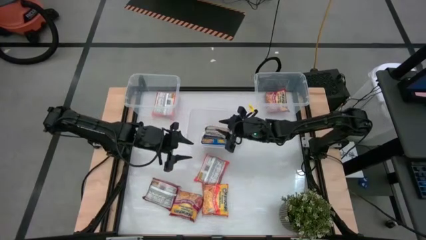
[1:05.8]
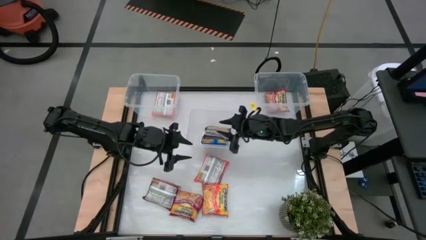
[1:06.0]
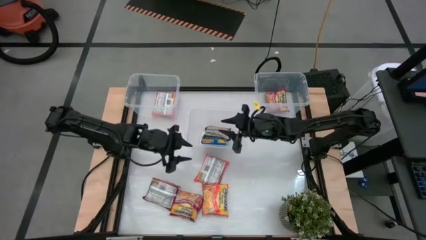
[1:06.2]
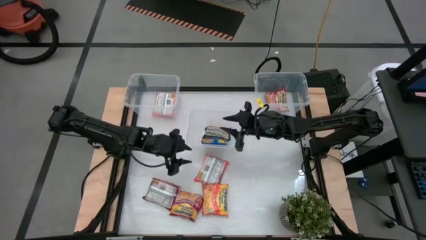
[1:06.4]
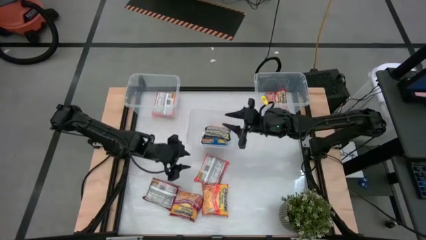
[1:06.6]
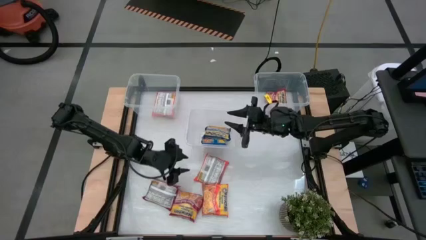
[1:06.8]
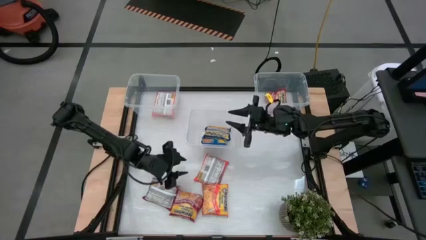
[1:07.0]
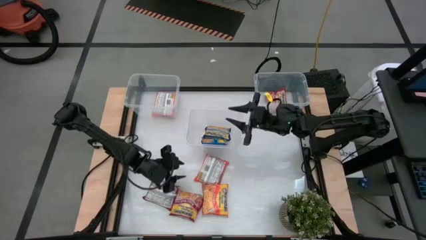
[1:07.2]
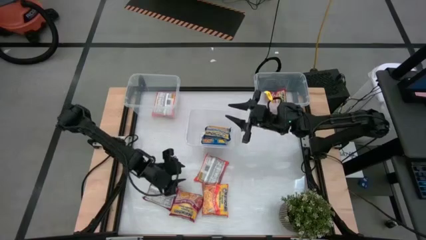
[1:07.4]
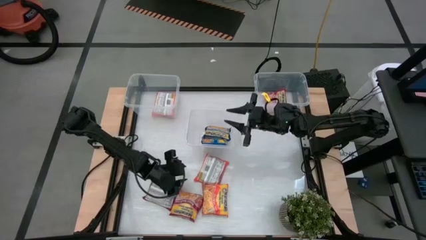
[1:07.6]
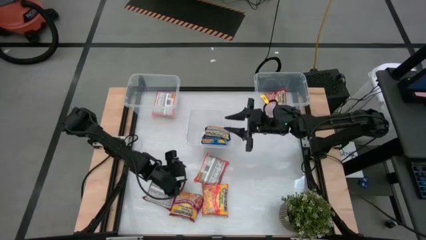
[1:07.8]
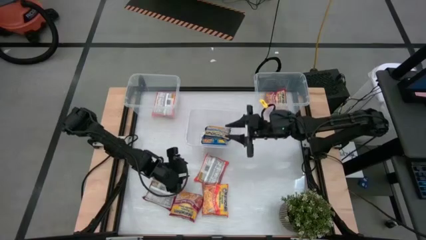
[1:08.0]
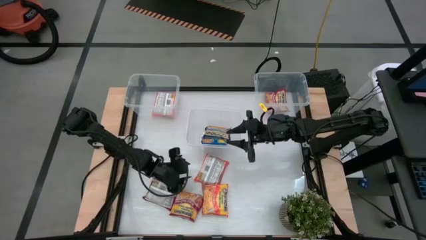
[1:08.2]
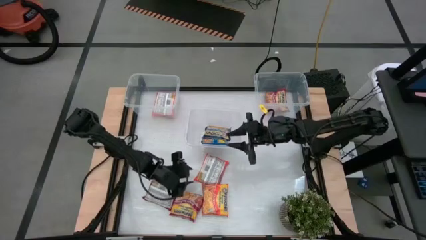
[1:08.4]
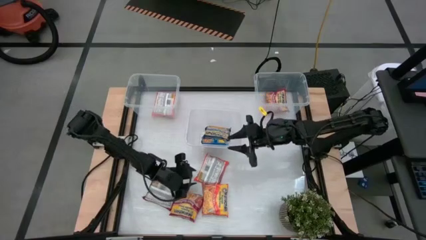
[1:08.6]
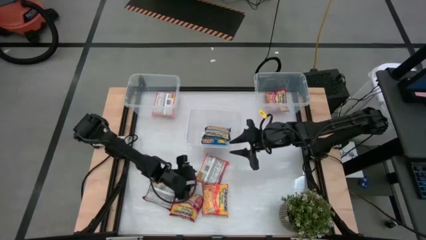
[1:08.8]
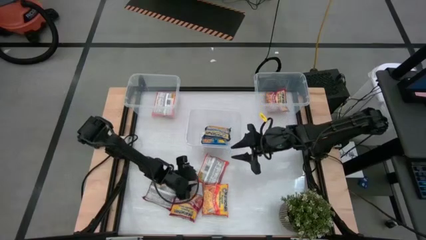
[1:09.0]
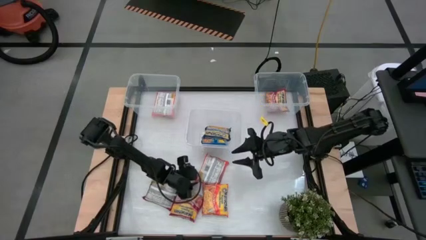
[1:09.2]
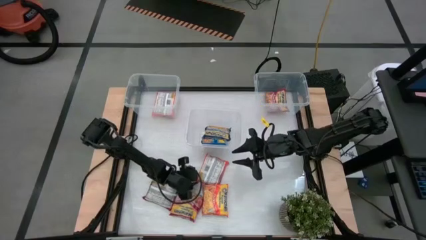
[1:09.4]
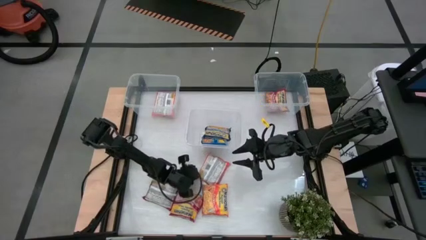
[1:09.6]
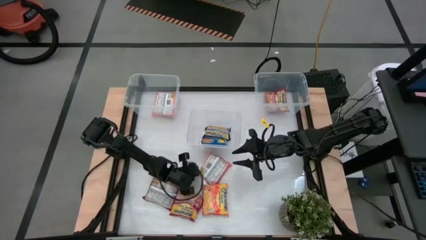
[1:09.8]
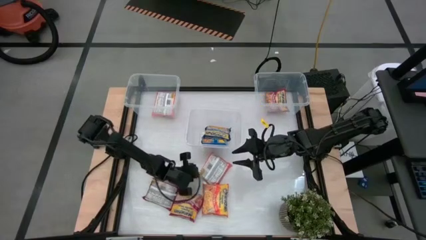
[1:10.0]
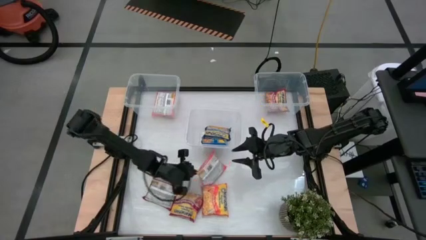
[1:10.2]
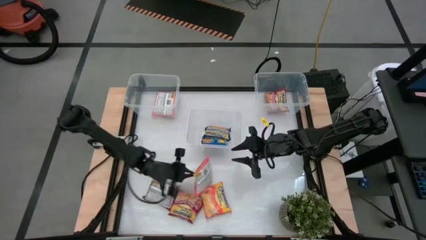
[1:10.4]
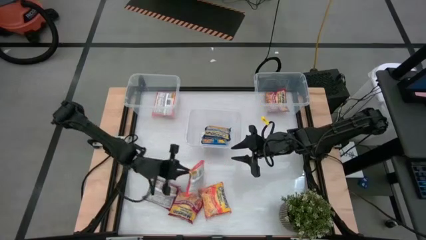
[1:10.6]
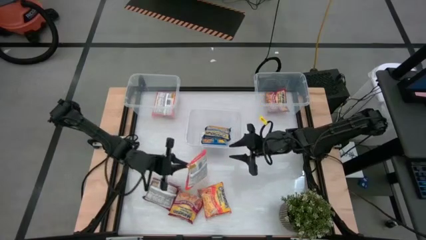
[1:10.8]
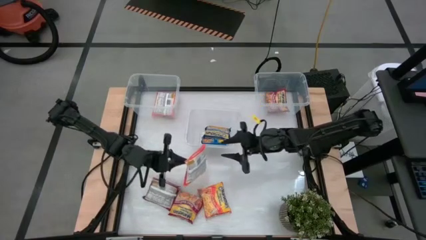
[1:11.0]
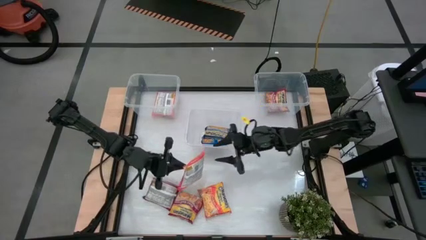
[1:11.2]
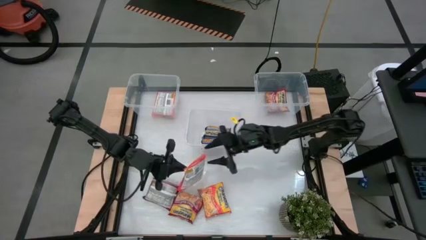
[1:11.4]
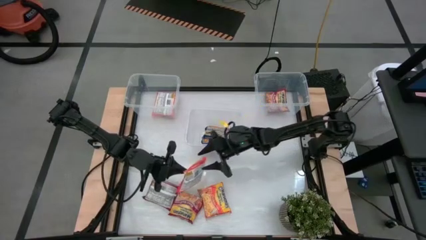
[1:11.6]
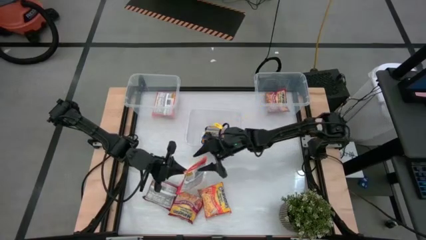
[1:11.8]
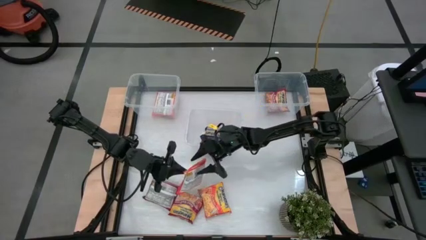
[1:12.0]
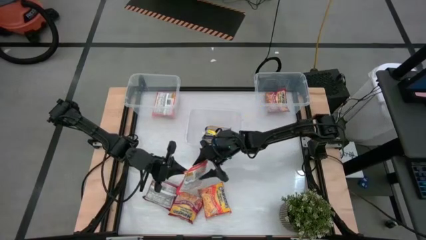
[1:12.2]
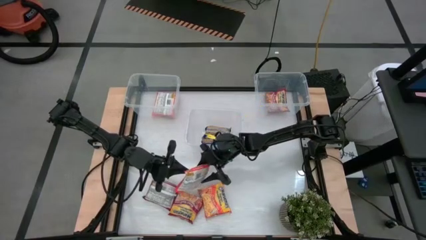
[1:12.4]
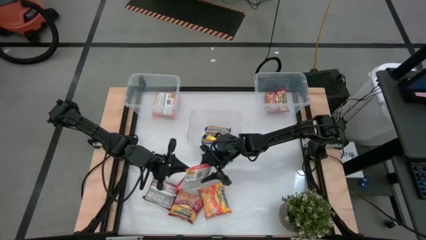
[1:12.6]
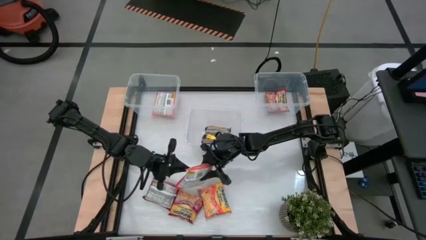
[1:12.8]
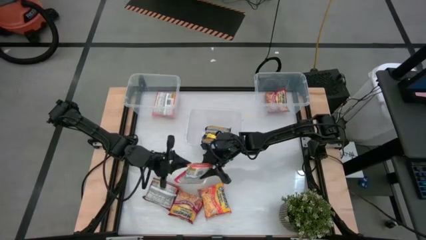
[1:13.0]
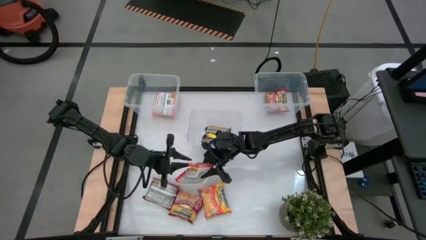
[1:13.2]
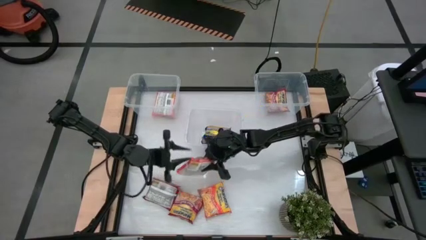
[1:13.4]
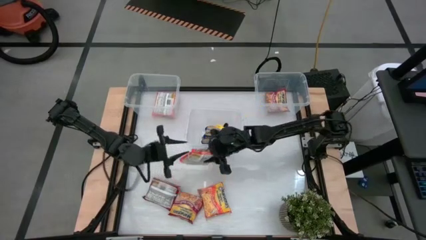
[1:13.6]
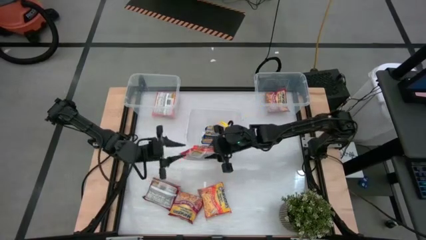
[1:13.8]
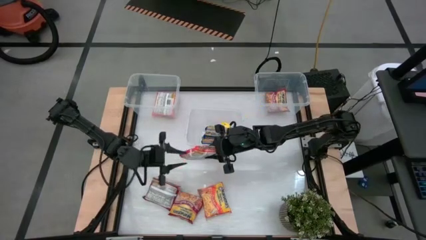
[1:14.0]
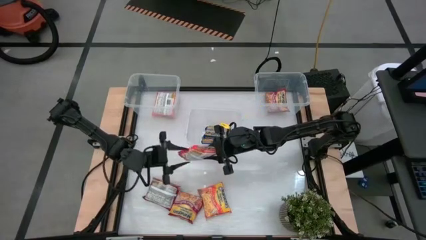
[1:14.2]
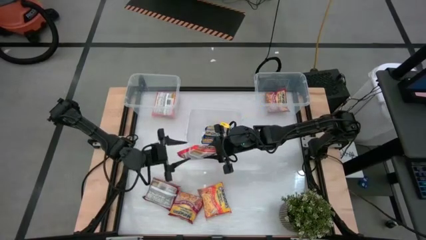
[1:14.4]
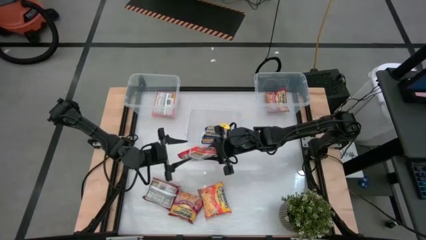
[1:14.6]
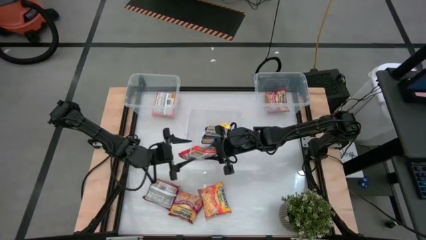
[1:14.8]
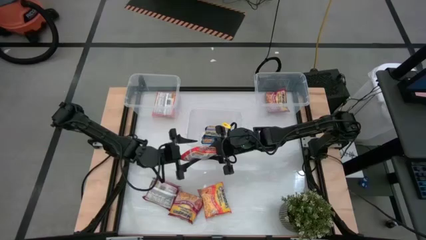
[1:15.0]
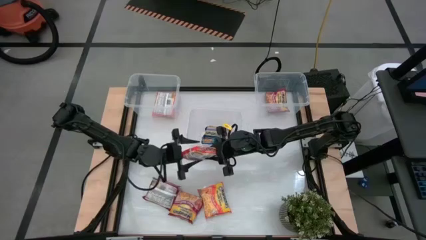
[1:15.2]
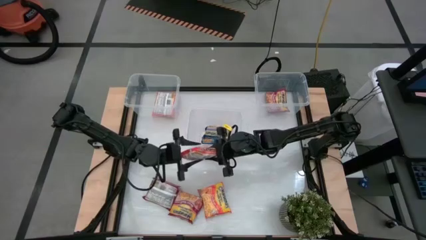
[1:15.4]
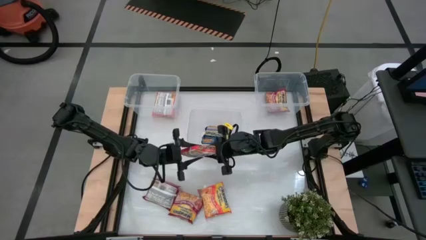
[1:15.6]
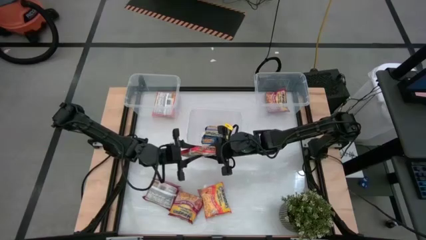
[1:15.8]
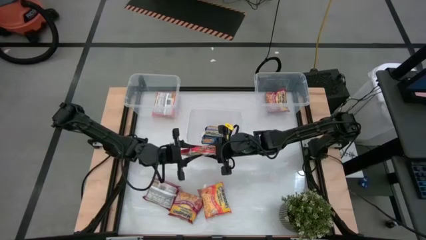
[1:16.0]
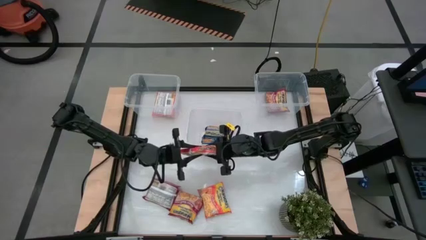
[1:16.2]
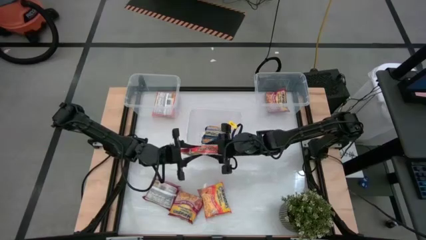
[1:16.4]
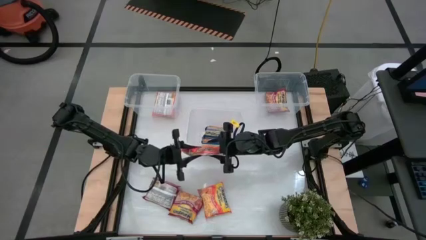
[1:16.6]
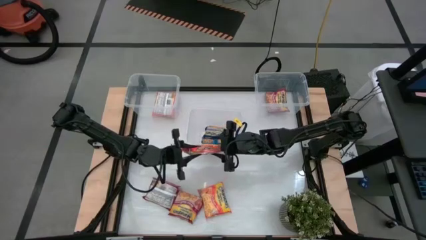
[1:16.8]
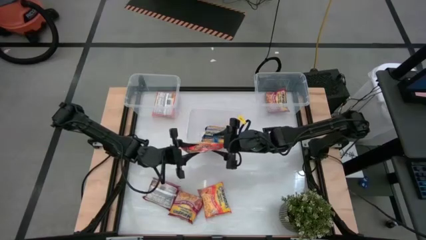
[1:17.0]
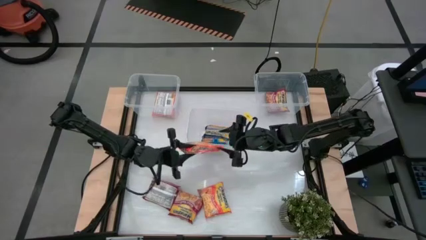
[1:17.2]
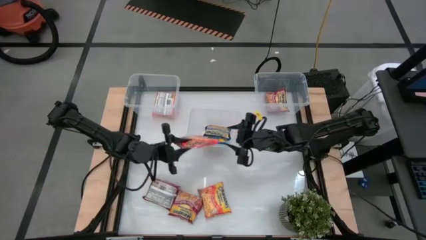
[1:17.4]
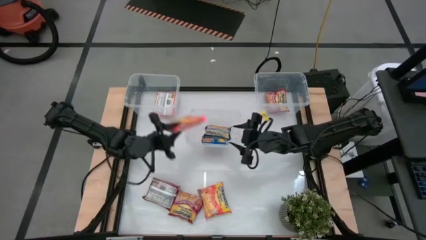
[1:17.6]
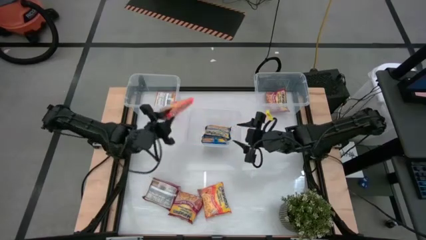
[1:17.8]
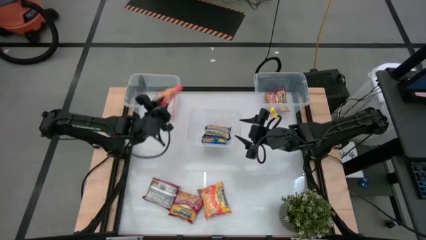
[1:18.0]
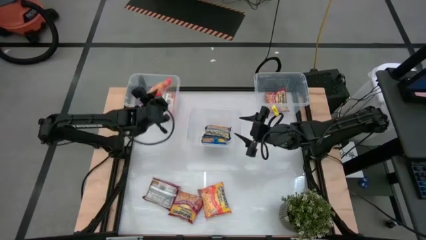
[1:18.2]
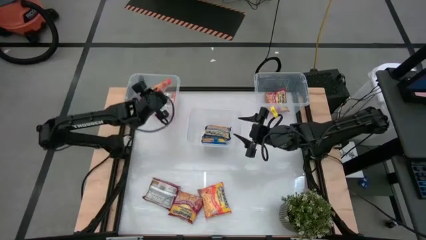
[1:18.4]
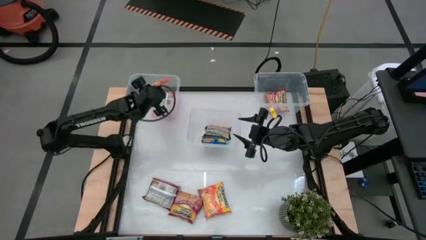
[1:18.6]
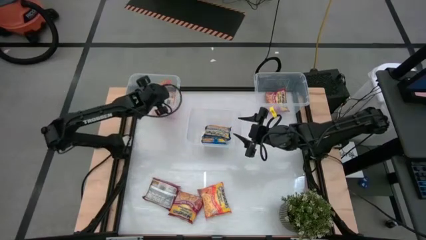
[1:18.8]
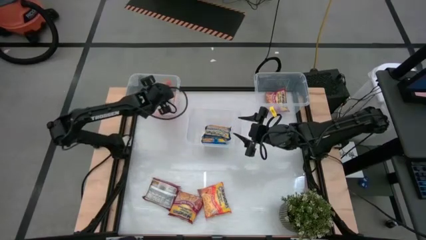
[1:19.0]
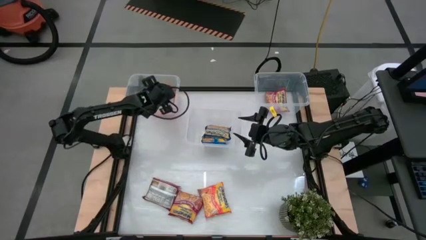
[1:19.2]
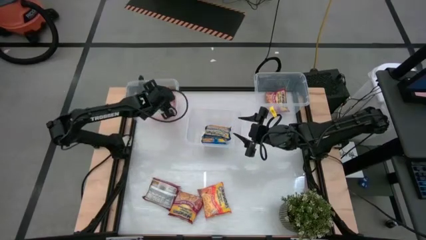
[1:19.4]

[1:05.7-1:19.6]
Task: Sort Maruchan noodles
Put the top orange noodle pack into the top left transparent bin
